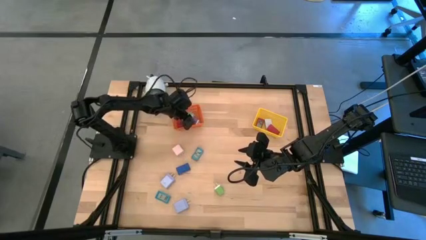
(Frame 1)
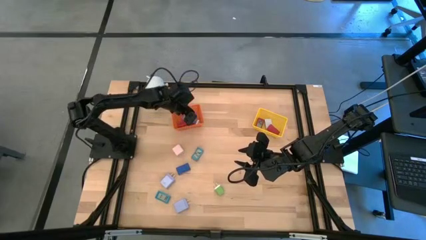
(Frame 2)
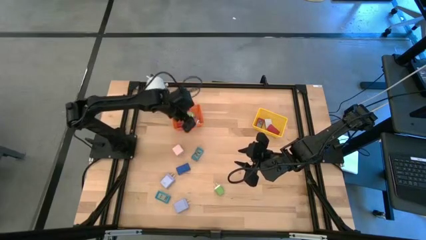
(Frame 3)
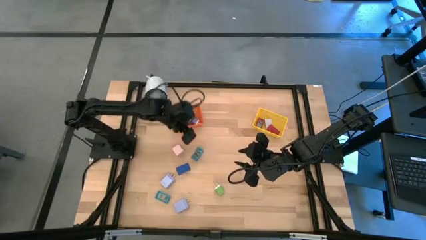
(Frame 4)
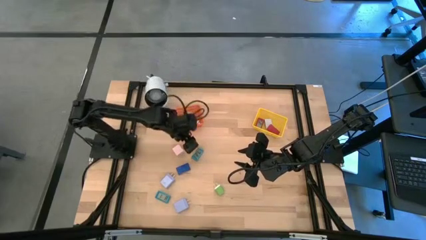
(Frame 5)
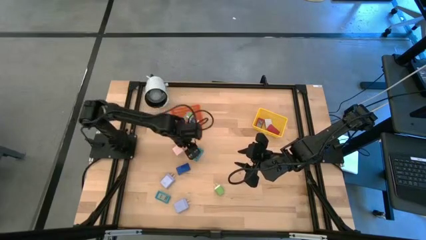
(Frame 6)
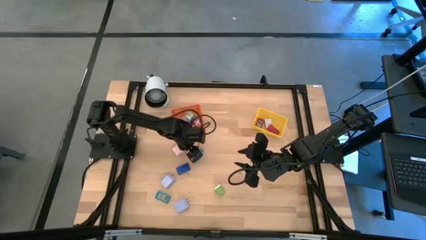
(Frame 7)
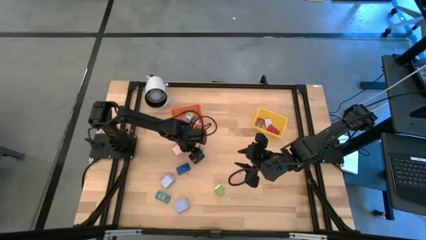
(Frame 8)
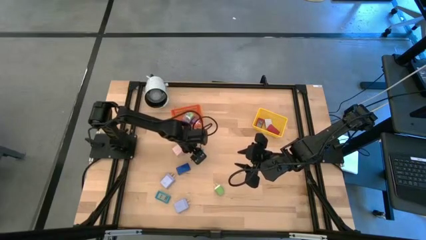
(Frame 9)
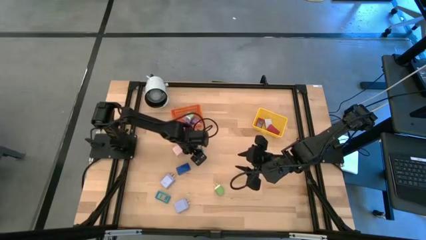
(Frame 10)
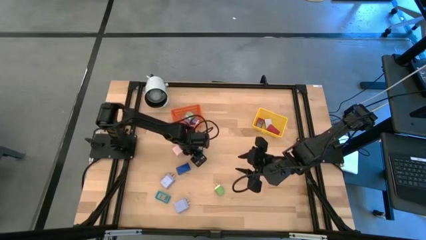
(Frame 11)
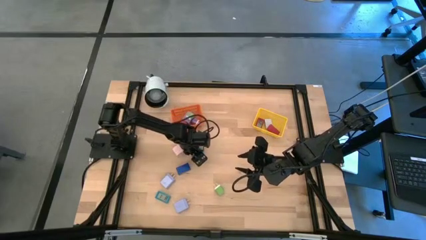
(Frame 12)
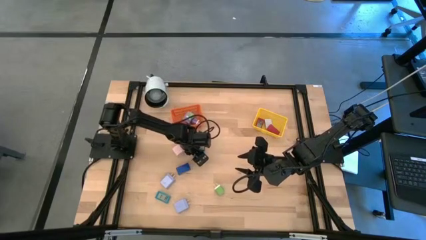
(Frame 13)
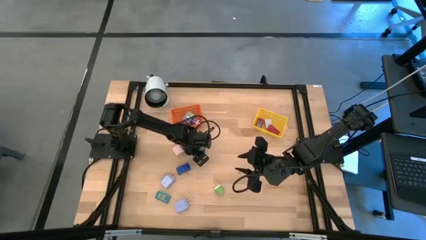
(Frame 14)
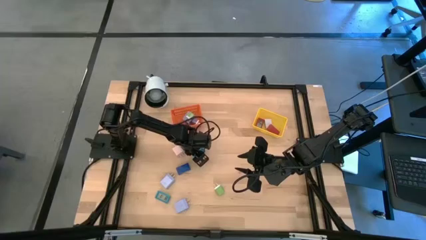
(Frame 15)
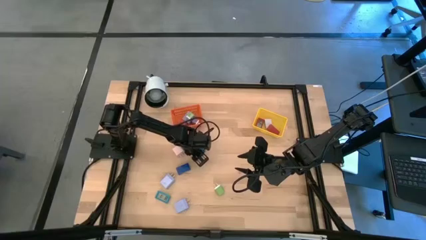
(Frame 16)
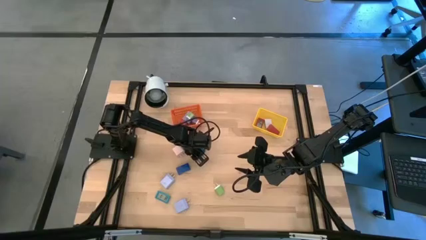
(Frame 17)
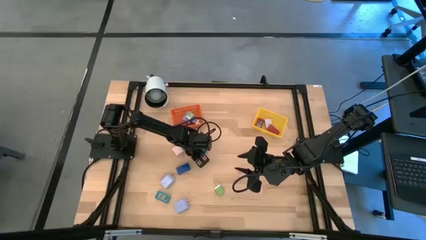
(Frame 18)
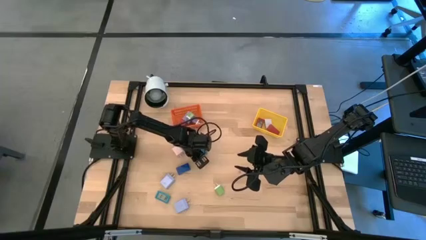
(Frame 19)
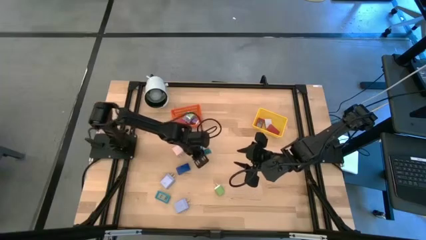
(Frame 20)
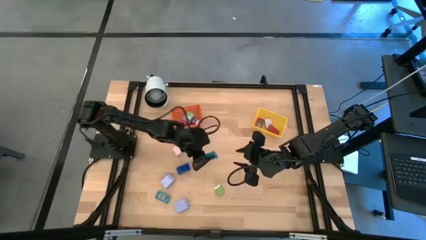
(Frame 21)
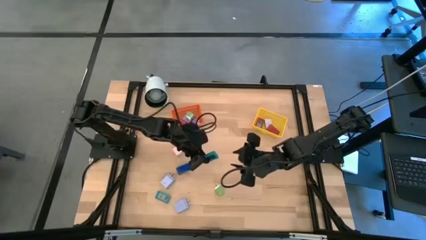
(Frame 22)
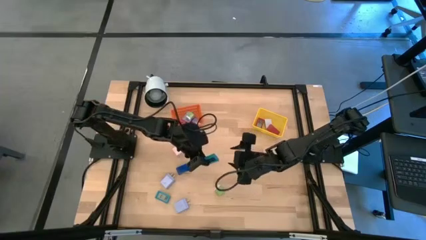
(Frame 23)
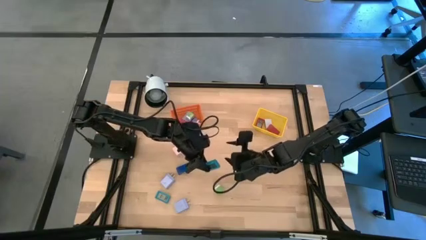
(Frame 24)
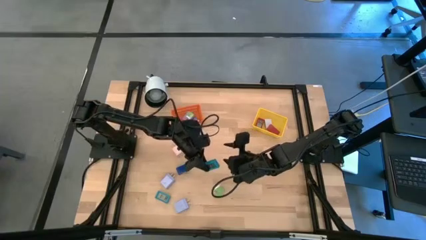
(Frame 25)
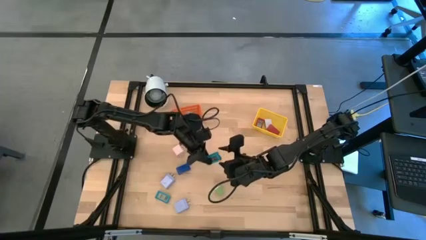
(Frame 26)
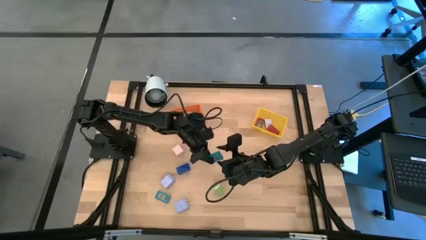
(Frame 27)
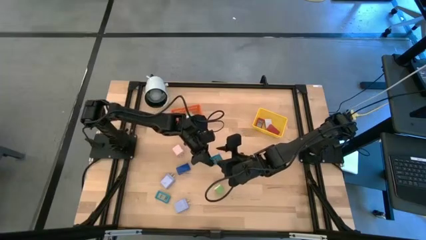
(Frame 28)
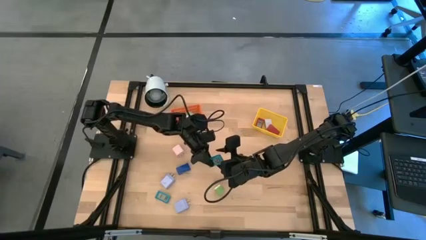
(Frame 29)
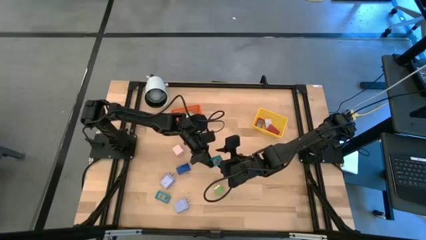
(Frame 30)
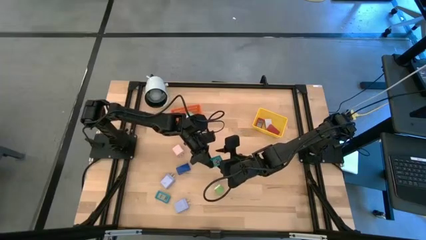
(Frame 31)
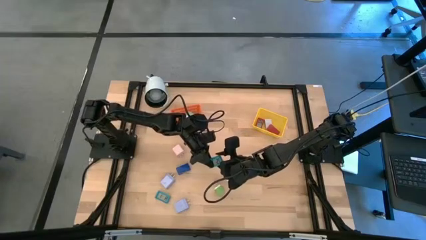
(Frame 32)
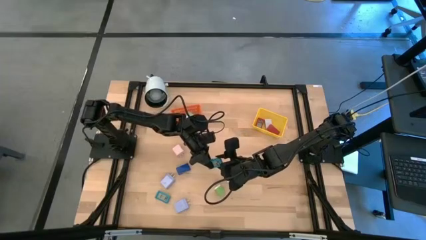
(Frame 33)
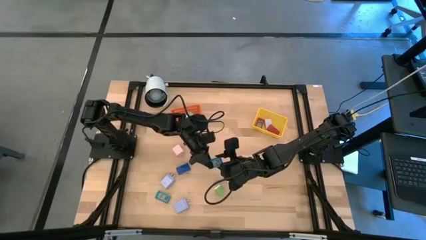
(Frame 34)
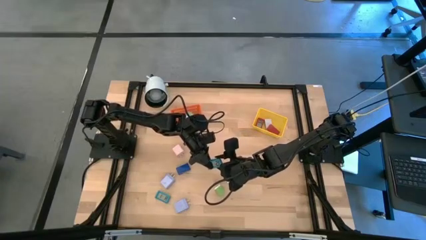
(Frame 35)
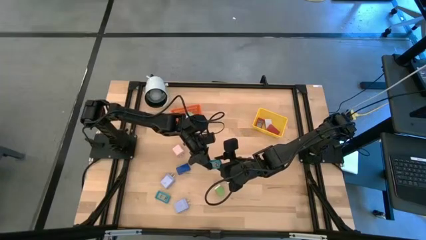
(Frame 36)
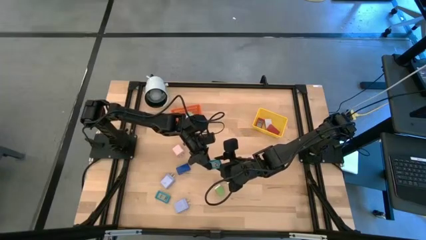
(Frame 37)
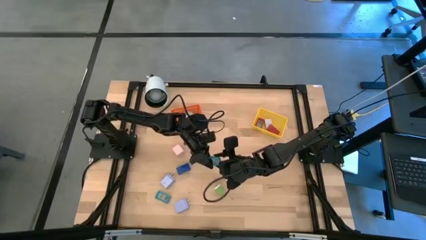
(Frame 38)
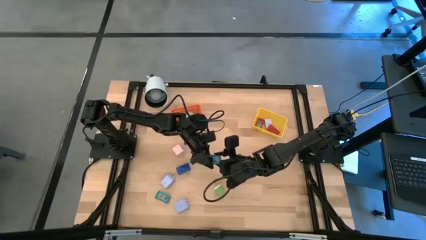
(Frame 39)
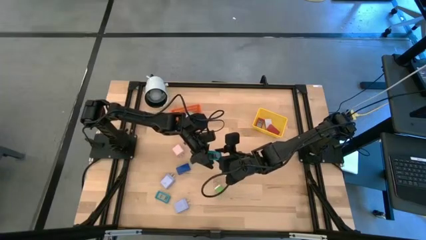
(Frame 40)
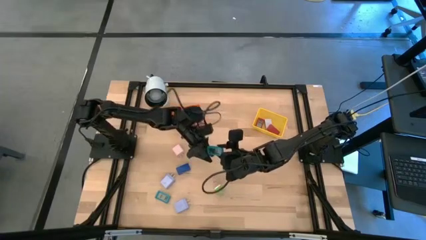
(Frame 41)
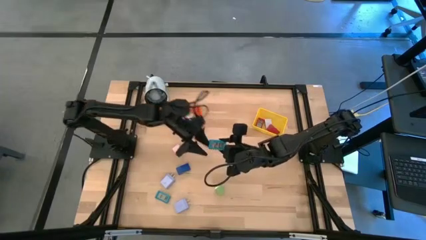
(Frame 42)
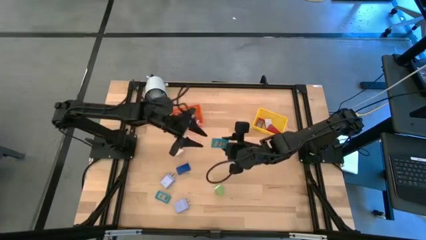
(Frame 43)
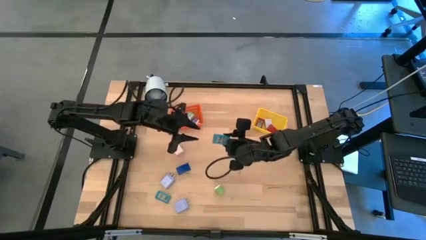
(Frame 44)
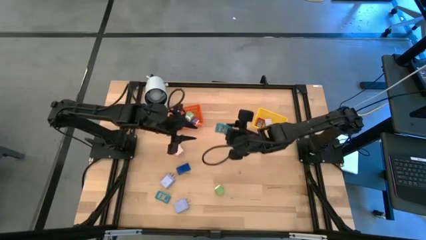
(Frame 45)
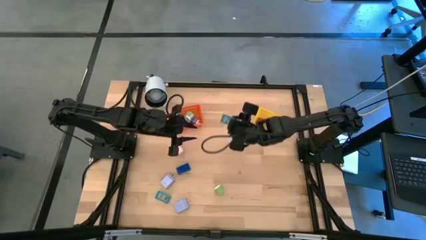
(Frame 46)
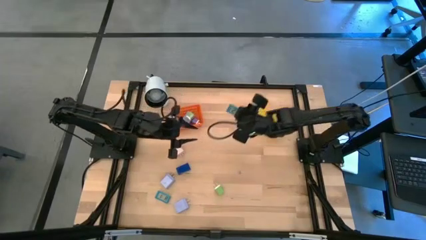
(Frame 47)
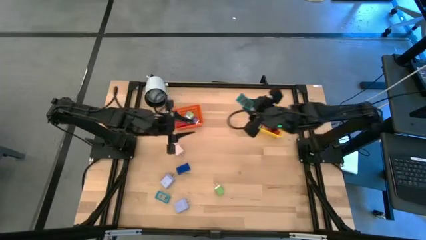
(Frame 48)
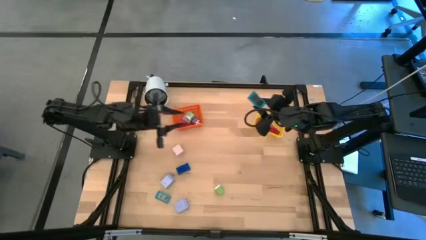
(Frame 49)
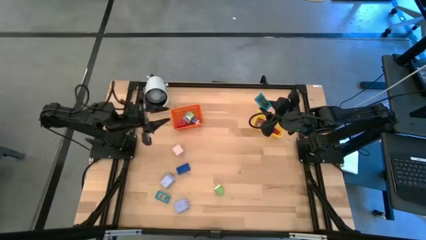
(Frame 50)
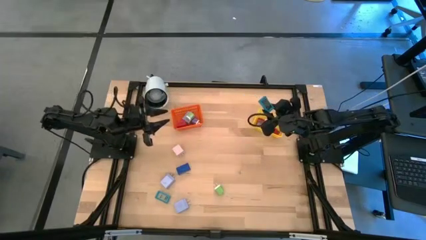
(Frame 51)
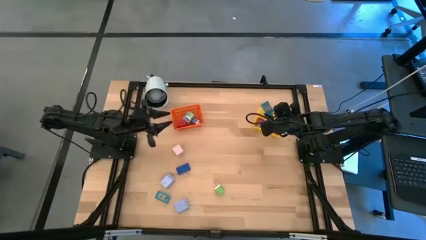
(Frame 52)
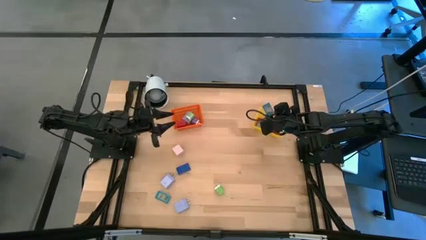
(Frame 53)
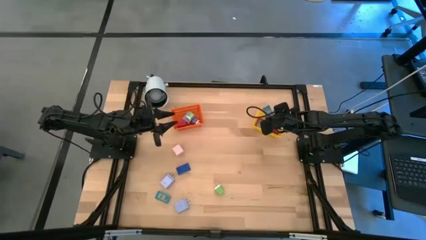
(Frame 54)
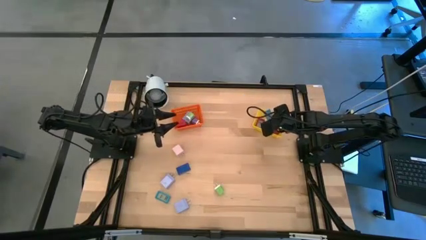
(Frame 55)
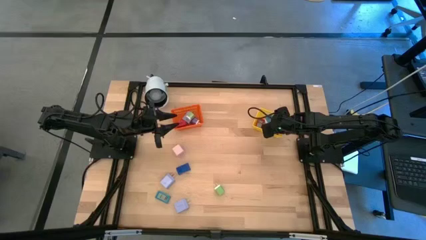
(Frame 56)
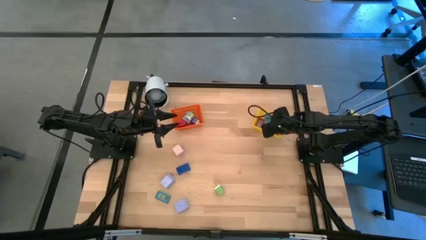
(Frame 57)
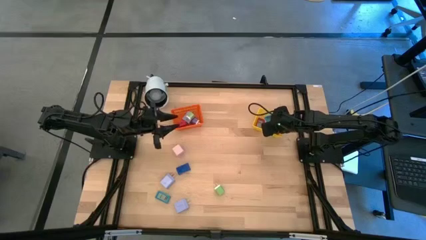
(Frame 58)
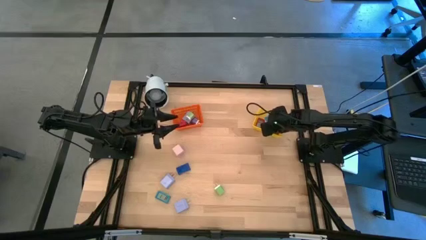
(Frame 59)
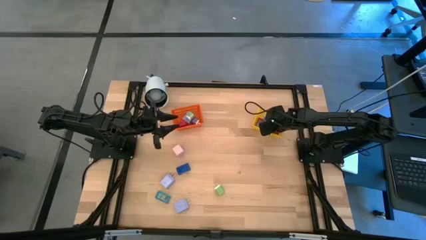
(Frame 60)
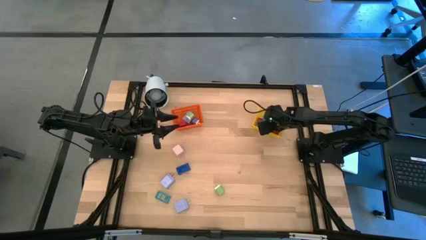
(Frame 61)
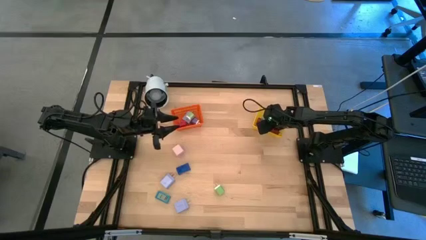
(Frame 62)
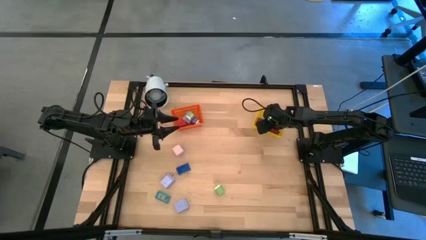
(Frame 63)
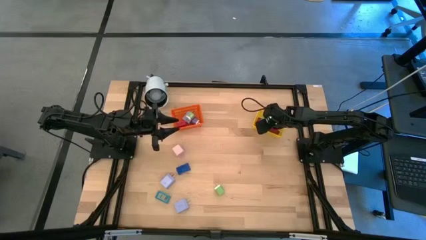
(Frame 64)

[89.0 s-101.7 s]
Task: Pick & Place Office items
Put the top light blue digital clock into the yellow bin

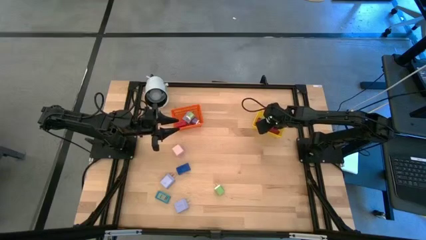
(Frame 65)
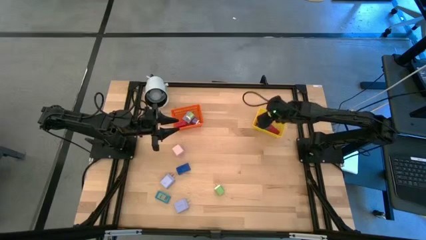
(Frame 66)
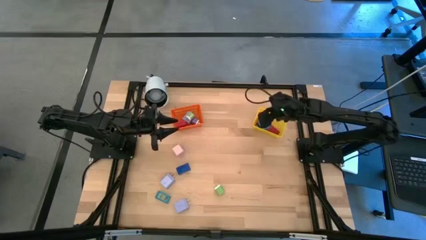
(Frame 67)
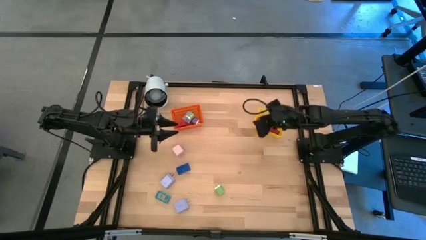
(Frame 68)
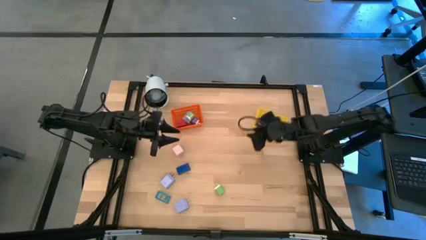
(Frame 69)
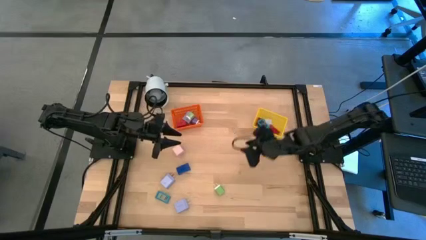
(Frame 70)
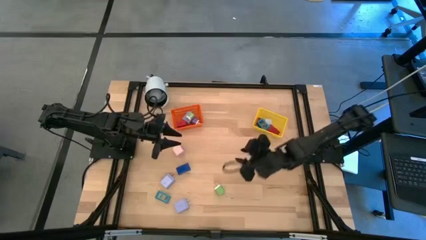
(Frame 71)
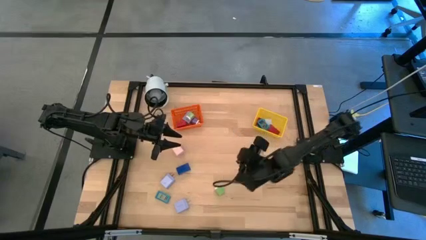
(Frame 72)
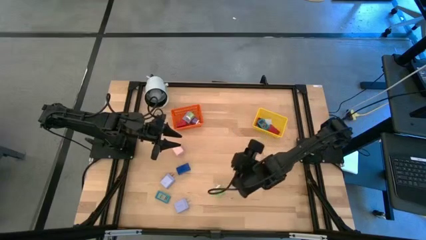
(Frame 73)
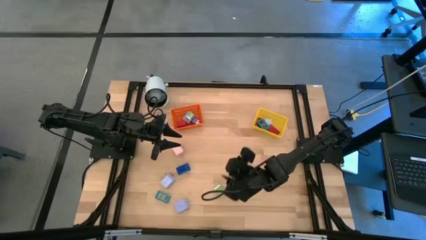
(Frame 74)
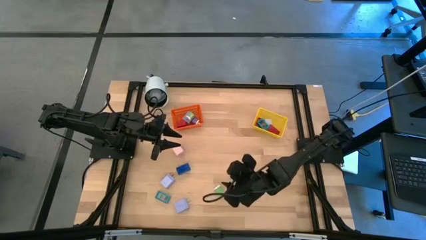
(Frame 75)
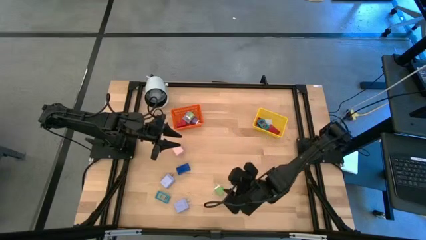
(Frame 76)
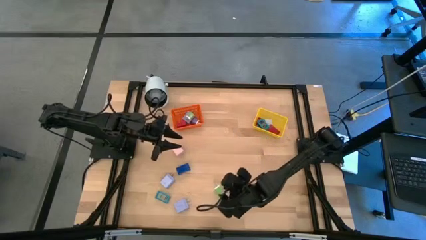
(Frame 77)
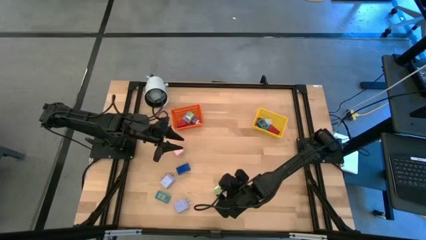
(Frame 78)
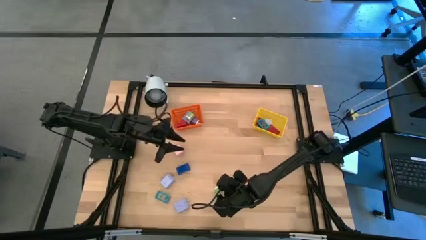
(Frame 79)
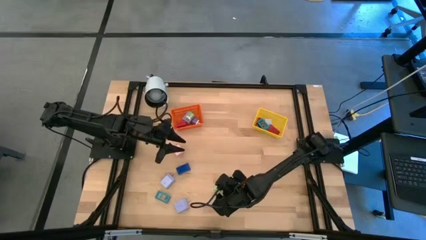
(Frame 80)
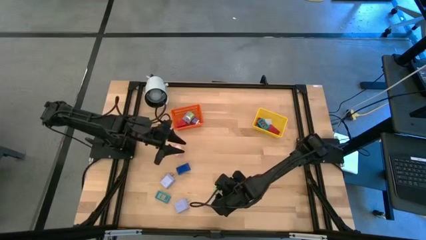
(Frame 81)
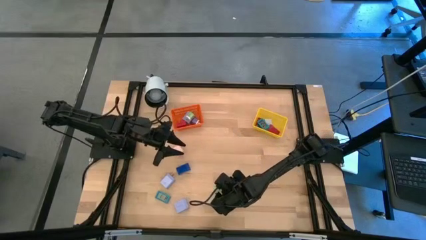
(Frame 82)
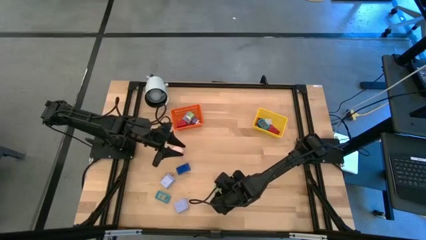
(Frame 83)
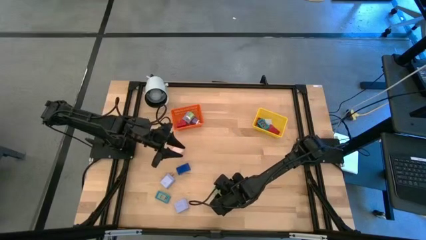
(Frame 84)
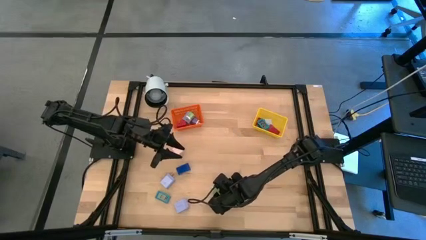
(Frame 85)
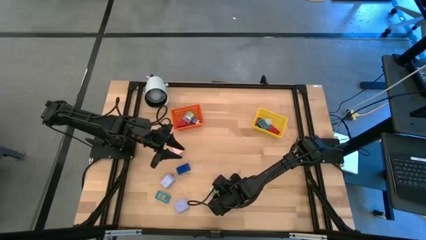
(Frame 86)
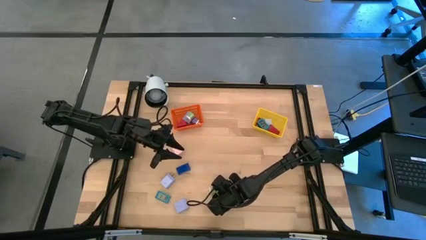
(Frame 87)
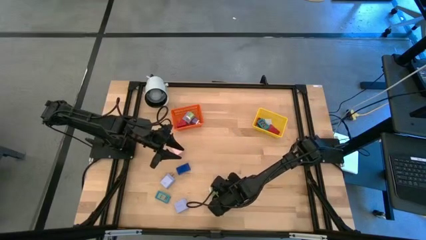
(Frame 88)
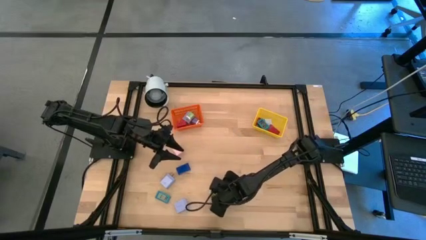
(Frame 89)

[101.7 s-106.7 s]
Put the green charger adapter into the orange bin
